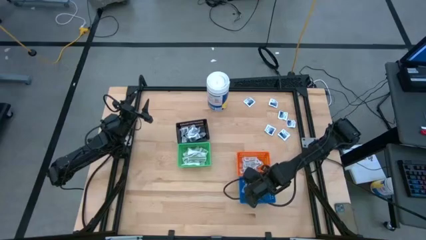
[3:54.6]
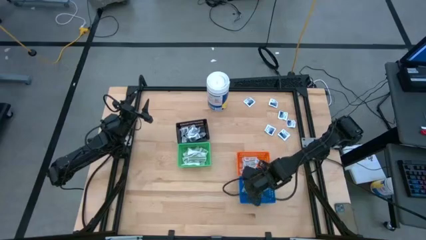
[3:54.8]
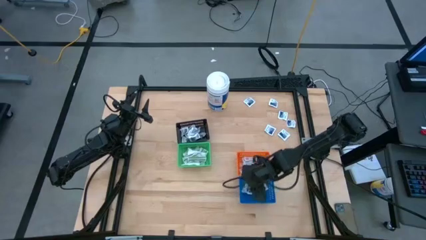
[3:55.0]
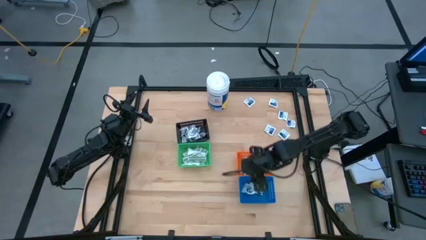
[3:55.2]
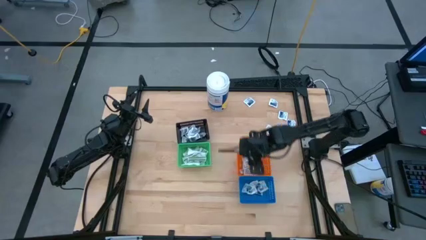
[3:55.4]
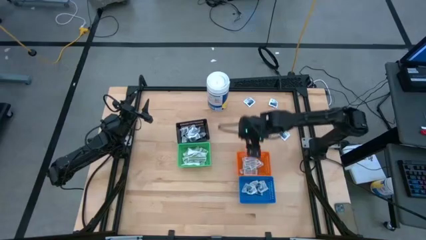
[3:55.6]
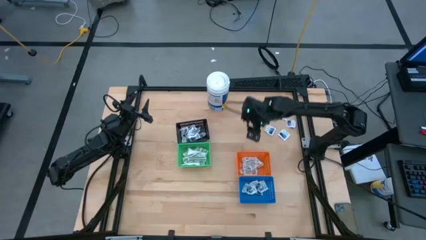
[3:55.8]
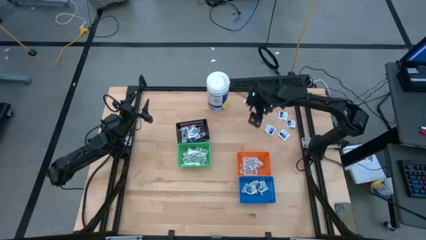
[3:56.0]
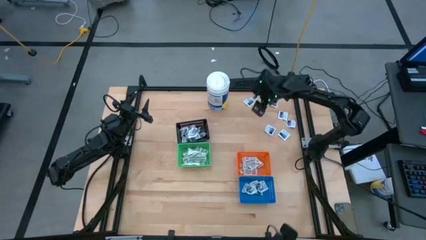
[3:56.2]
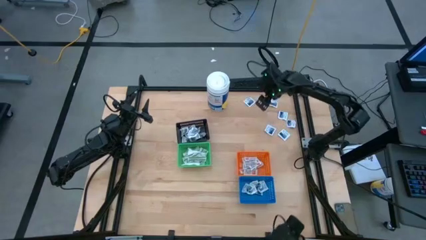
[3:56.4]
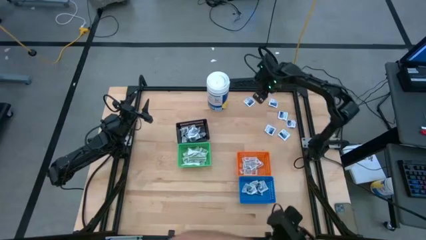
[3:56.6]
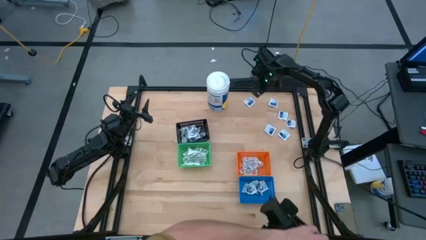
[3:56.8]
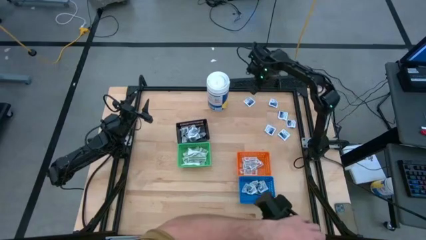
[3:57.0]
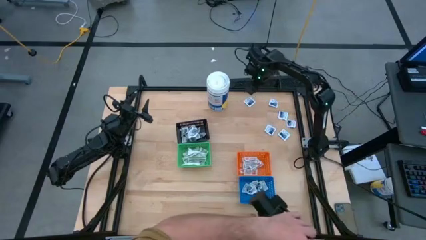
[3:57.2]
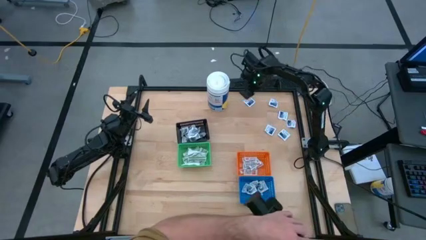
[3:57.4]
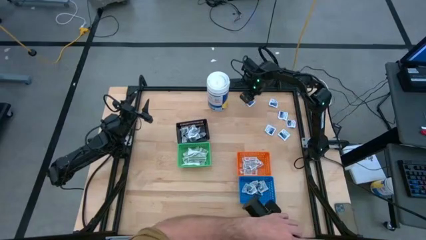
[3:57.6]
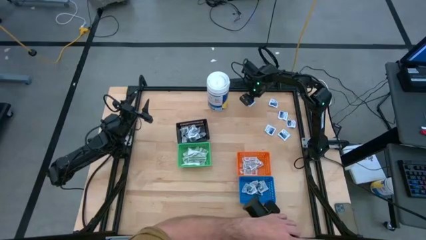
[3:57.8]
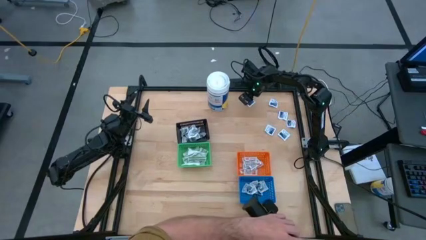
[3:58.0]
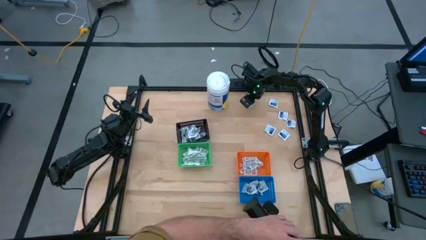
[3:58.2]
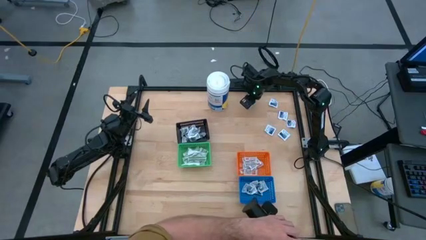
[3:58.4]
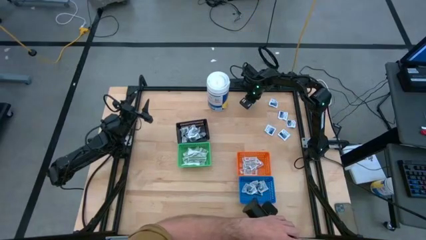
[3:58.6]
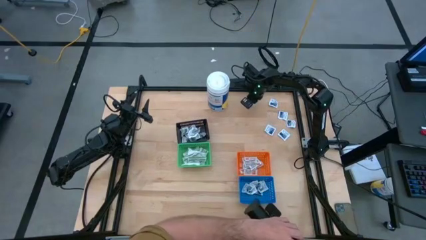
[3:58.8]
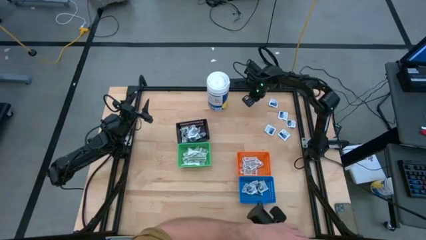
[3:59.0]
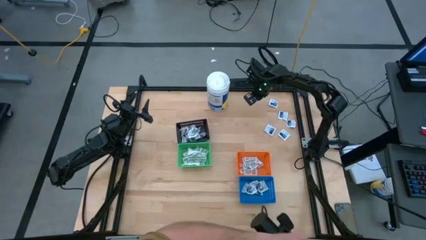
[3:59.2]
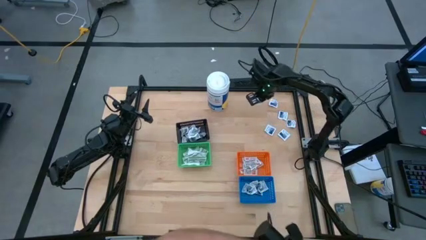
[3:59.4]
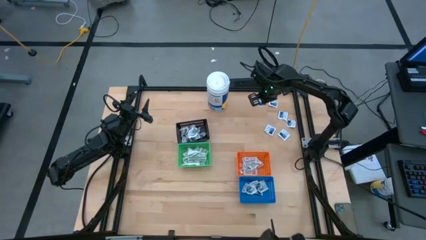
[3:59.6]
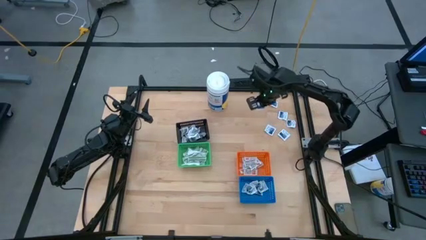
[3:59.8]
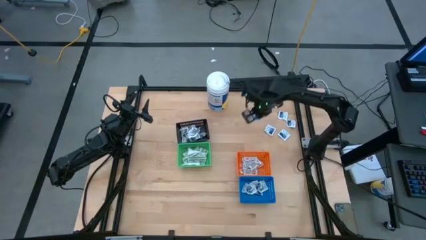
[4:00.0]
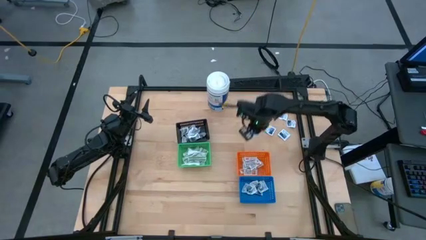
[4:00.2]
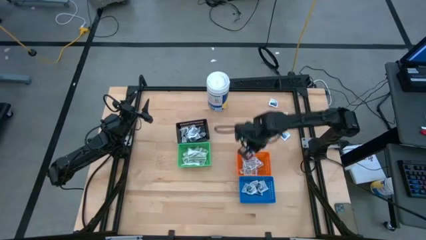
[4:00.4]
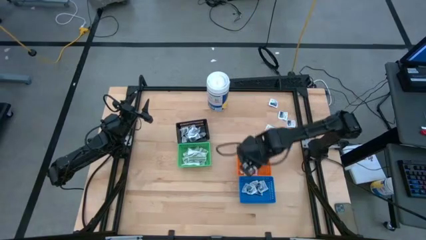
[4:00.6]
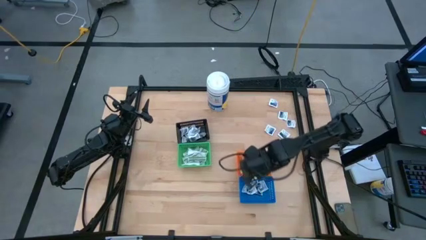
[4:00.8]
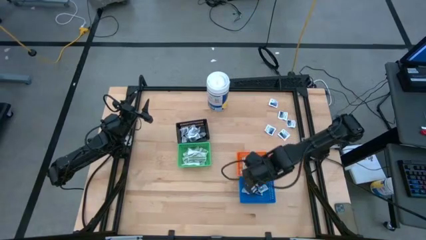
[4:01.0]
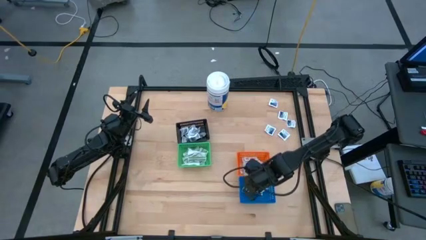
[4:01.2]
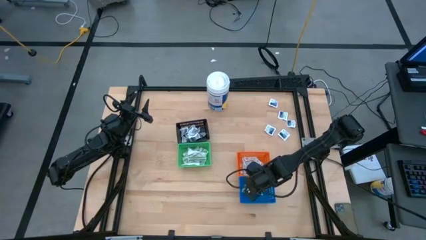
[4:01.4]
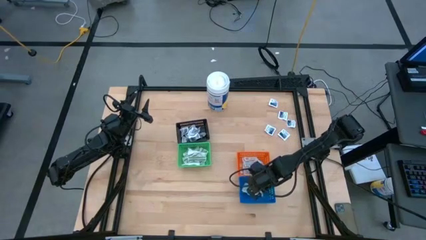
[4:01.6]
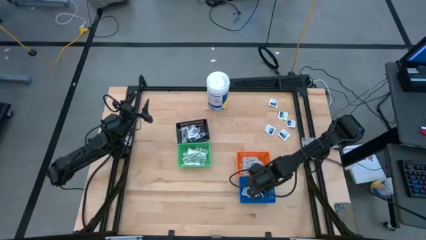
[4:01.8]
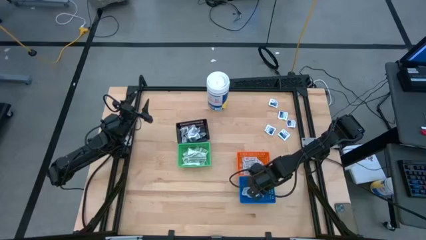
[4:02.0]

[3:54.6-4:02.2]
Task: Pick & Place First Aid Supplies
Put the blue pad into the blue bin

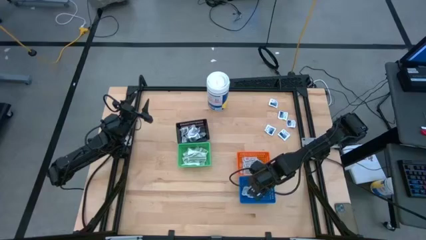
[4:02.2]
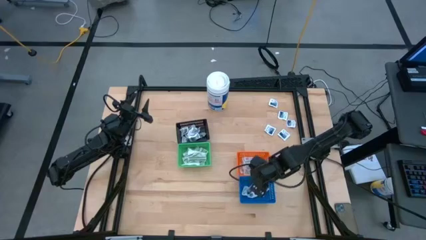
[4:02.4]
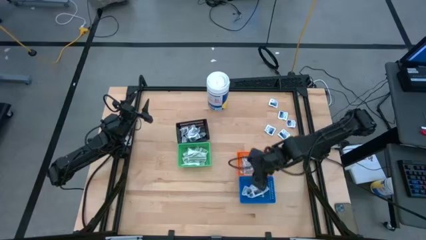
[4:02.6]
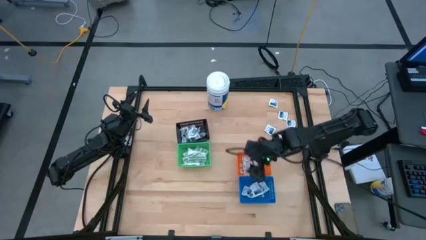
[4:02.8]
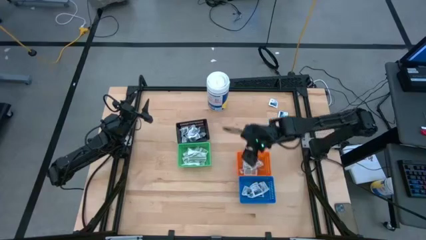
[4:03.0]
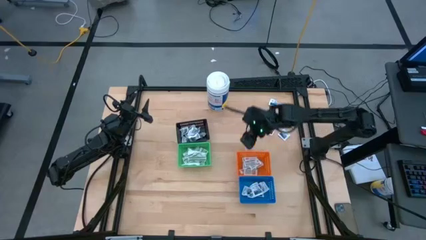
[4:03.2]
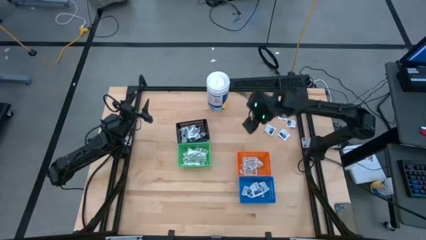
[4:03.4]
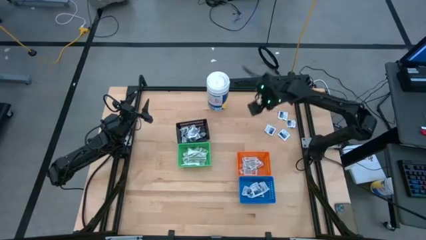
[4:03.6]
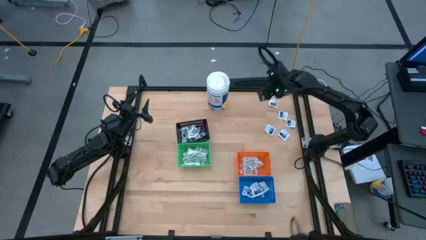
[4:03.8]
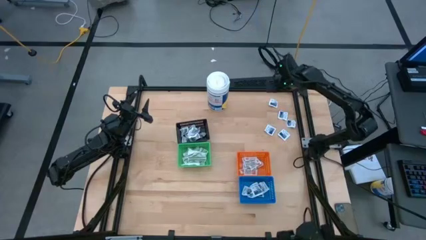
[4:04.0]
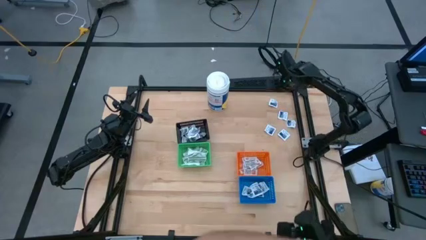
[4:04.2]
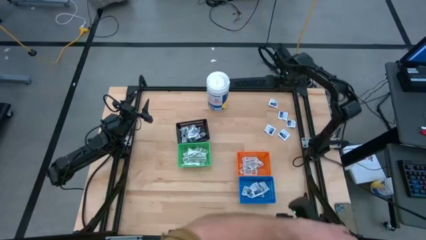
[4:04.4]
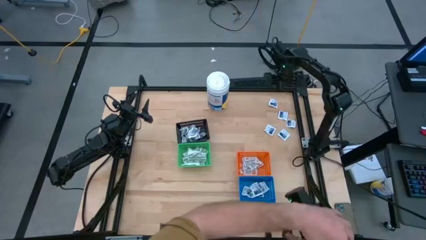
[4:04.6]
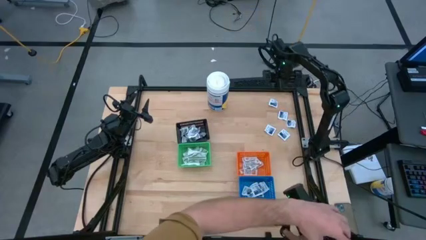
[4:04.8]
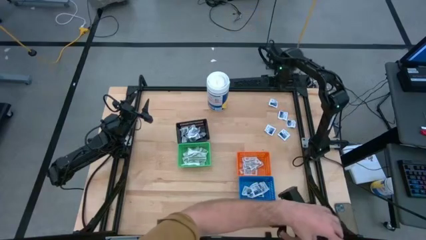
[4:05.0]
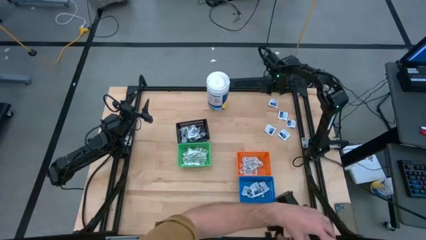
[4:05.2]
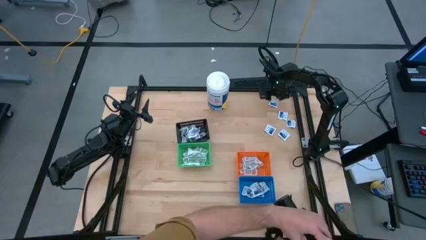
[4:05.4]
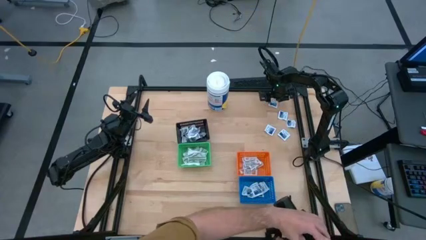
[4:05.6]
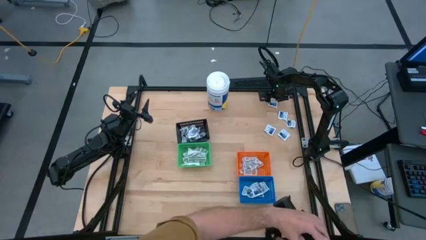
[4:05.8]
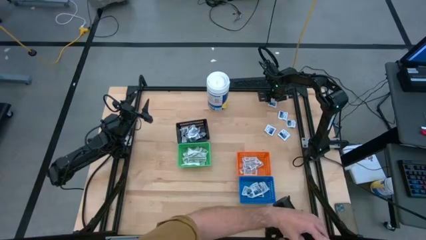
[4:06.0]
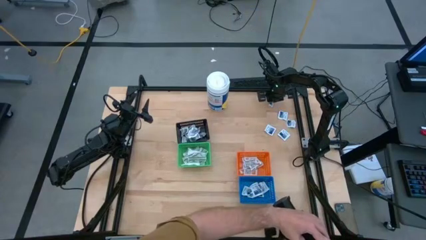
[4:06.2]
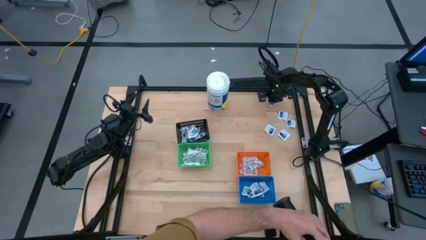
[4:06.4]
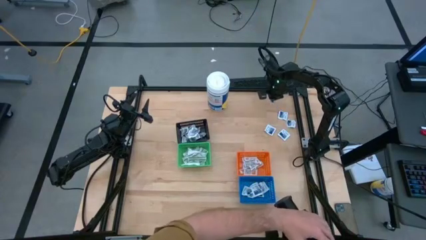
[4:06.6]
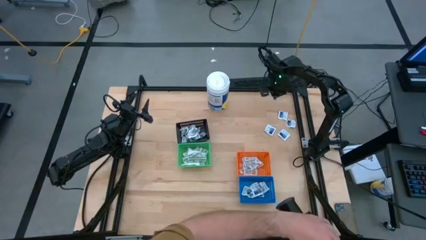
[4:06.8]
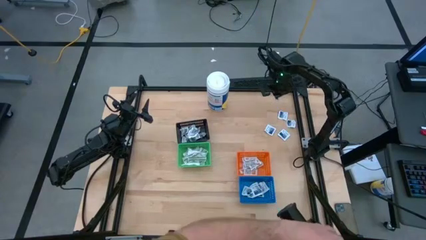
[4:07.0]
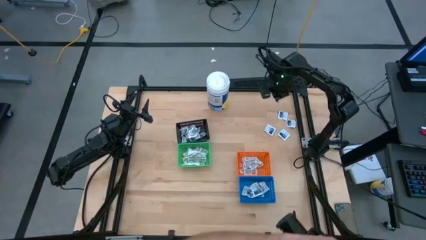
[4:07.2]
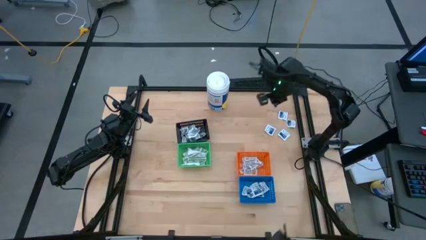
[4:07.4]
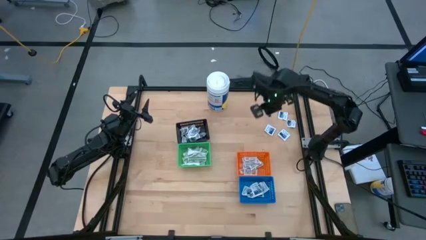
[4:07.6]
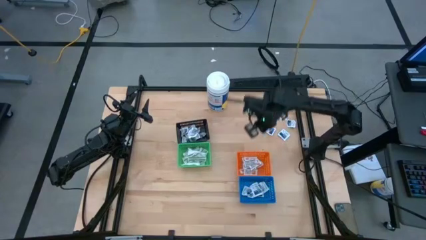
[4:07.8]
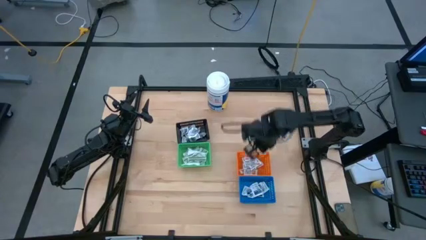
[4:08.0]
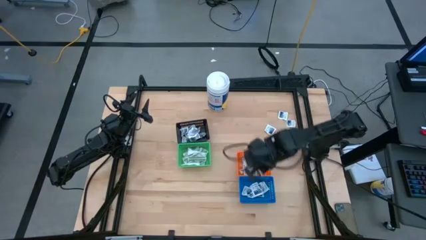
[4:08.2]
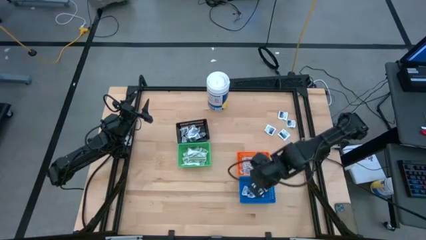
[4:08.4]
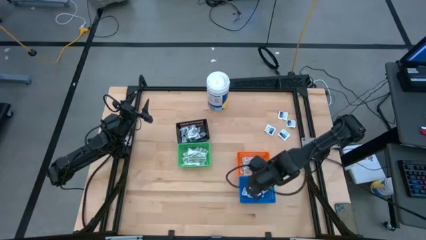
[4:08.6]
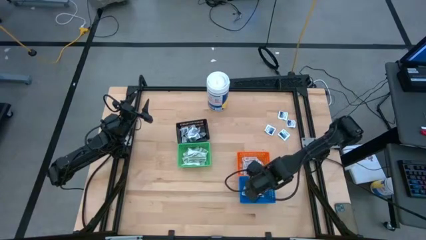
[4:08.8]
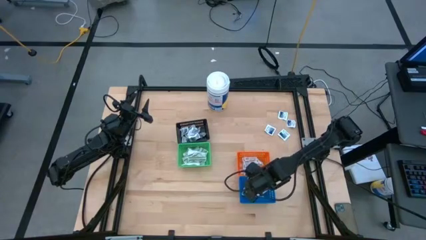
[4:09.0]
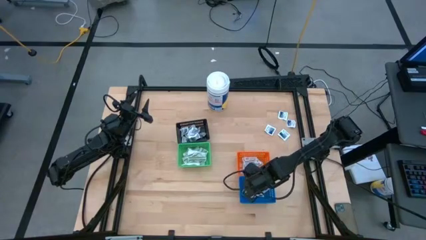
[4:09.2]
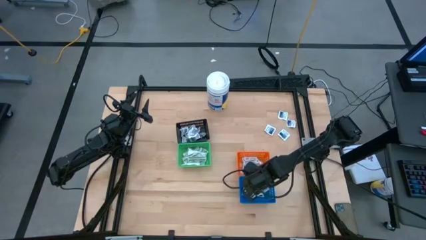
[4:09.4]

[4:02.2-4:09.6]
Put the blue pad into the blue bin
